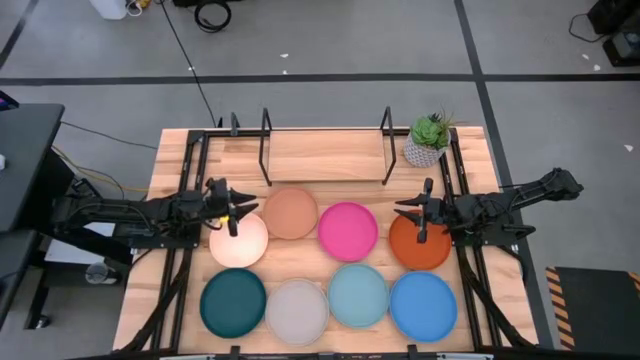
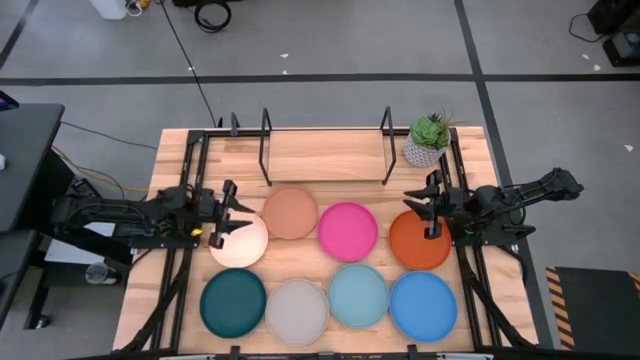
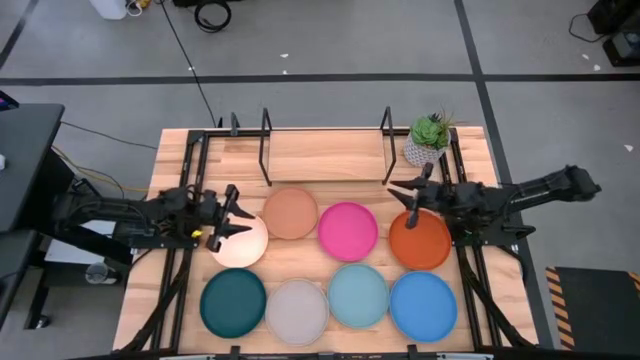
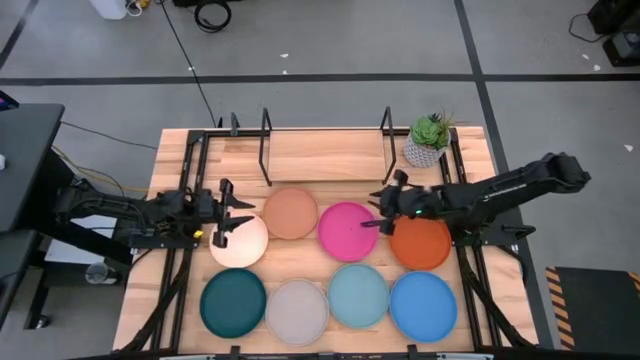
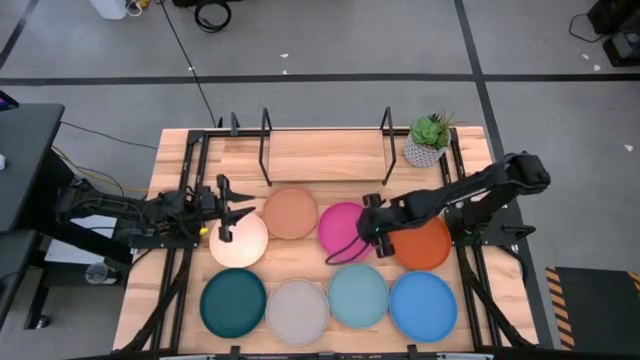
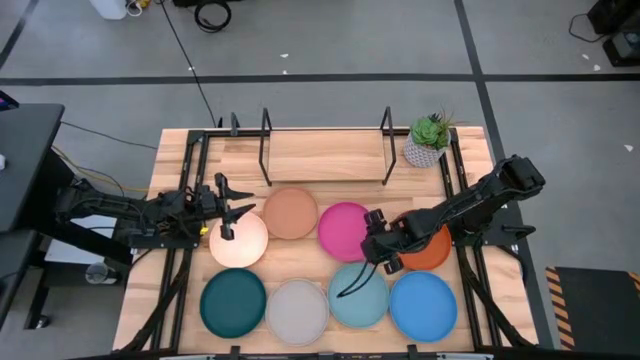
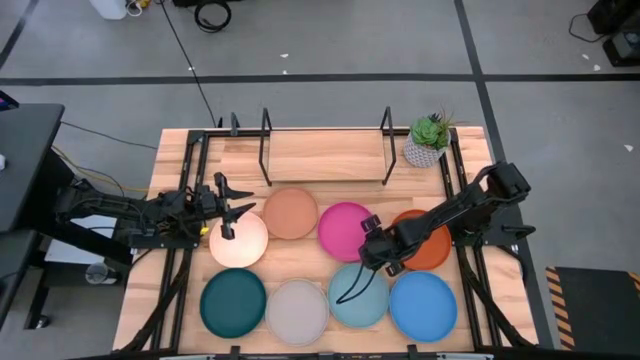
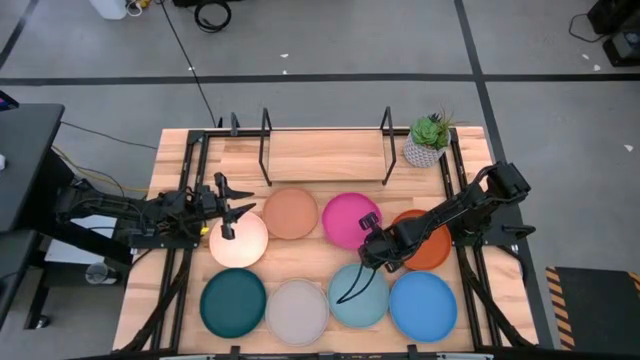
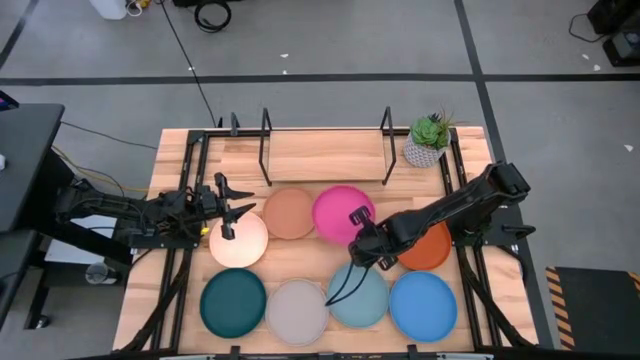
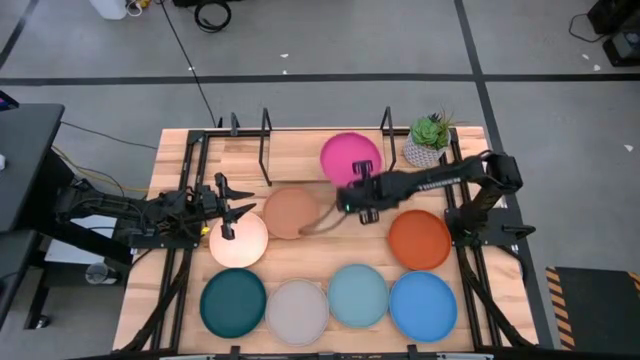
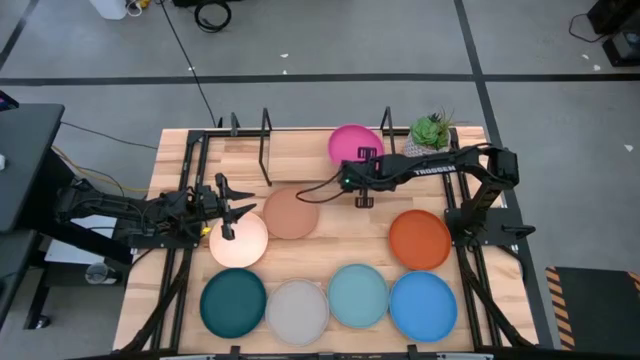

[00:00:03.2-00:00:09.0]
Task: Place and stack plates onto a shelf
Put the pink plate on the shelf

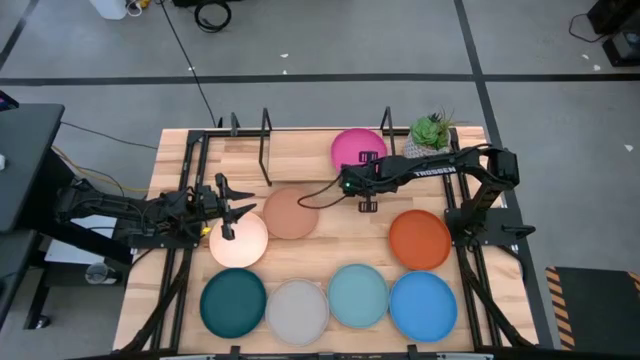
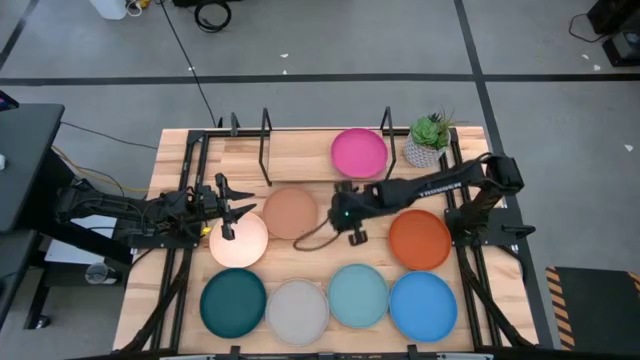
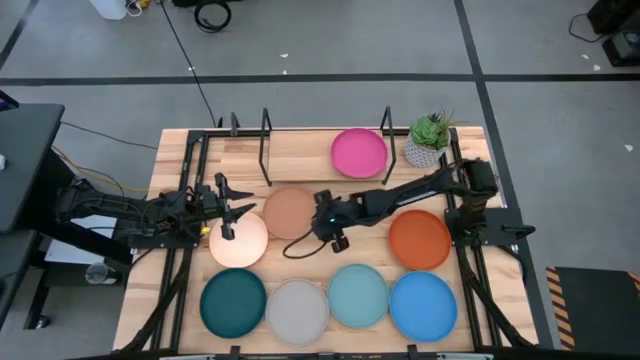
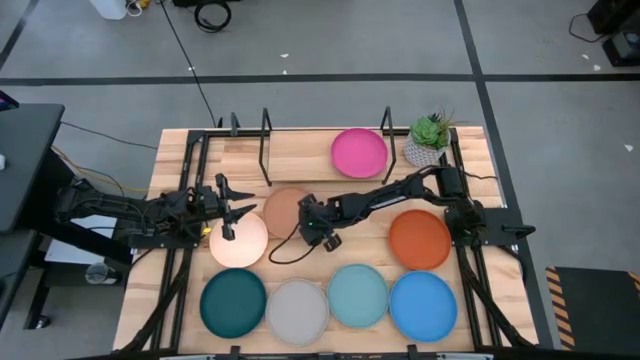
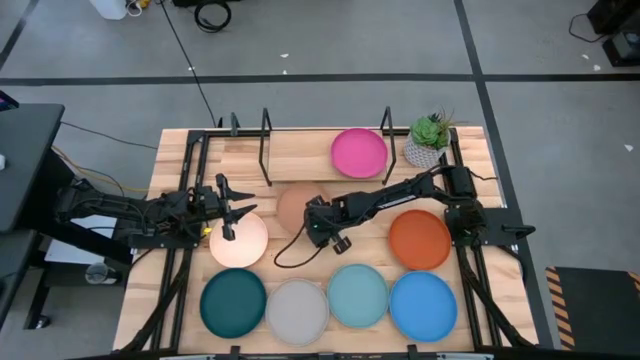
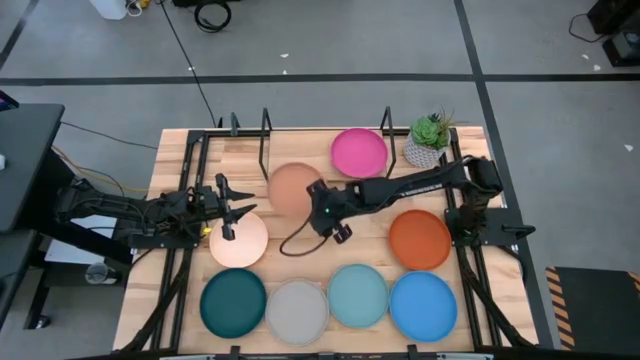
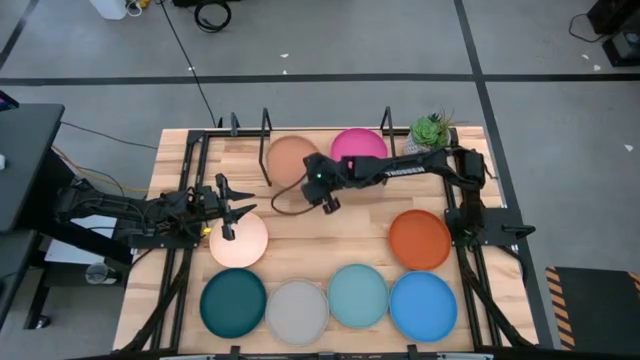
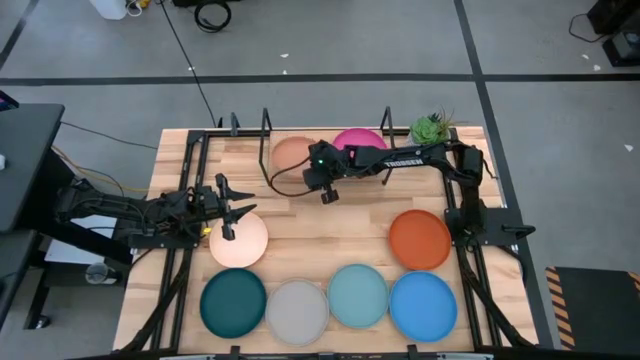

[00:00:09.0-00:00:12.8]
Put the brown plate on the shelf

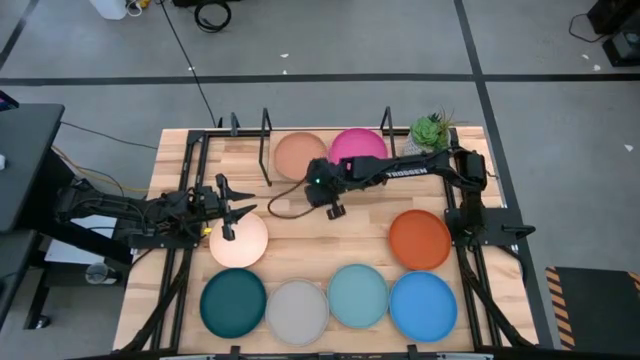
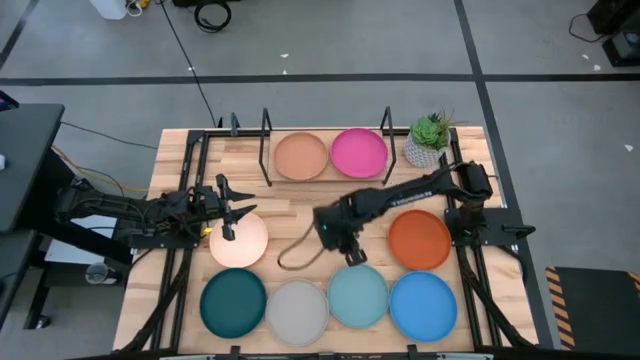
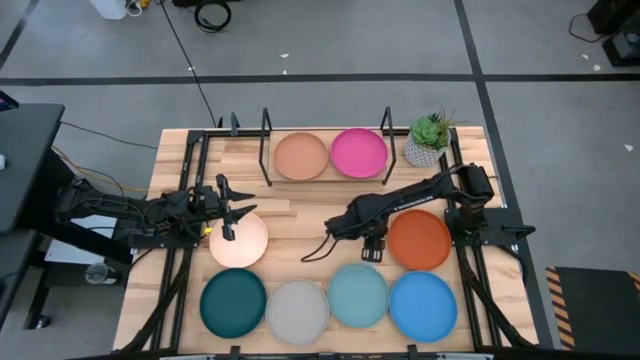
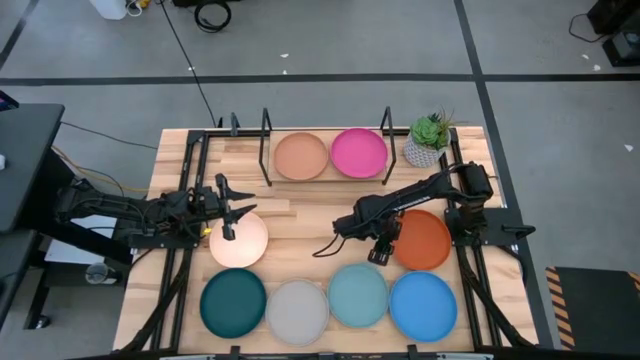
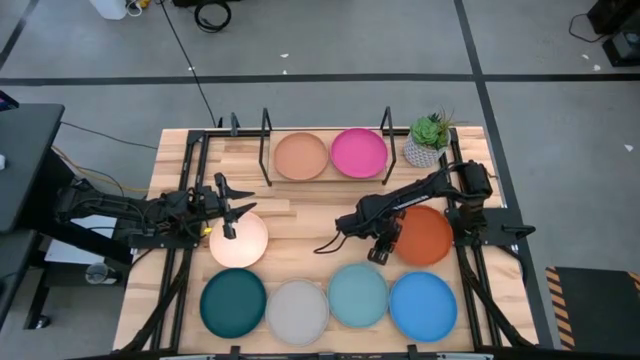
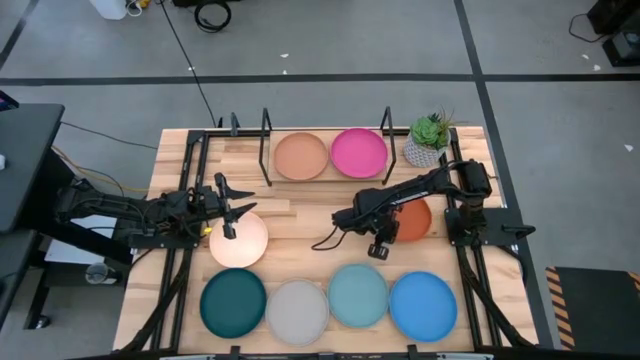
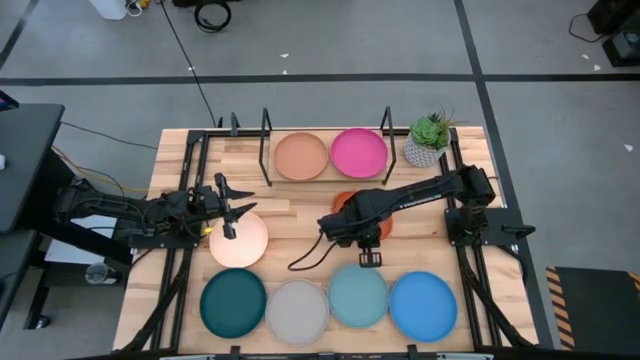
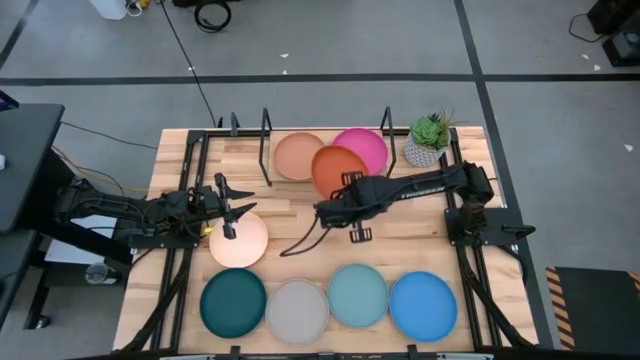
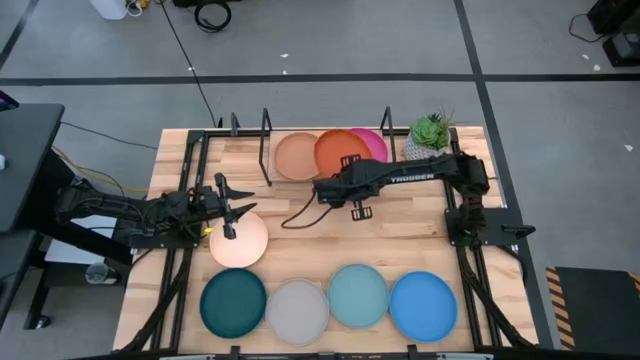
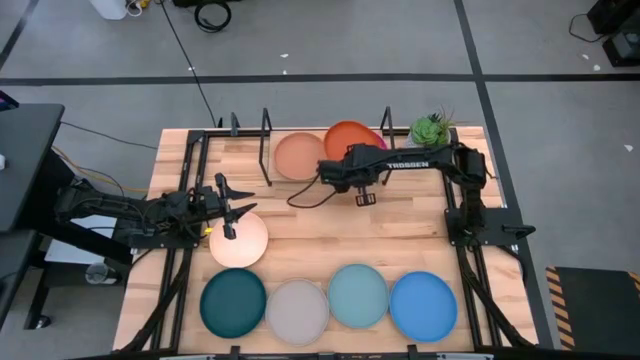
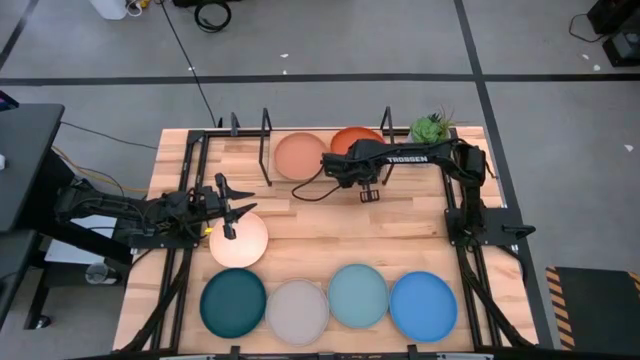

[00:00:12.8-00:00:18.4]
Stack the orange plate on top of the pink plate on the shelf

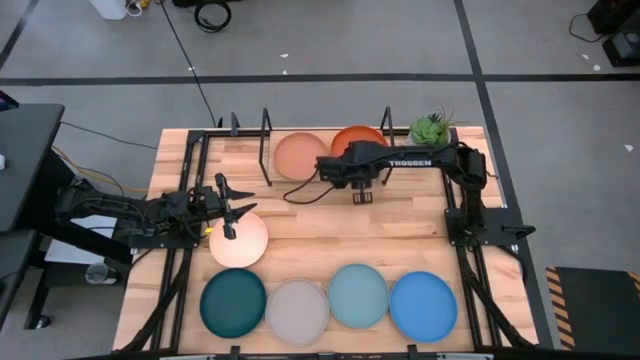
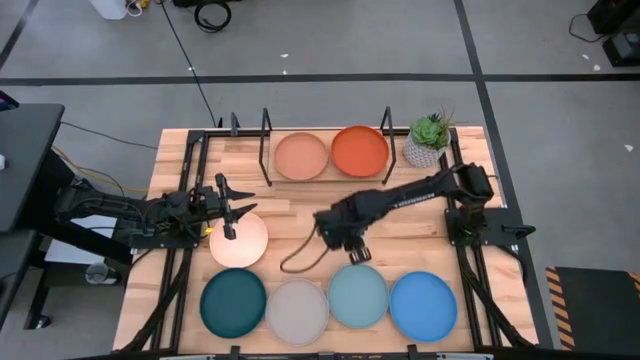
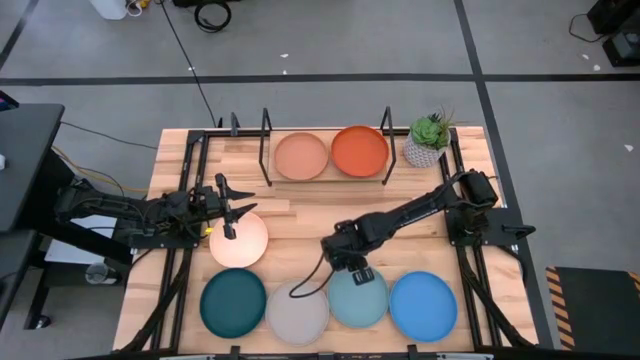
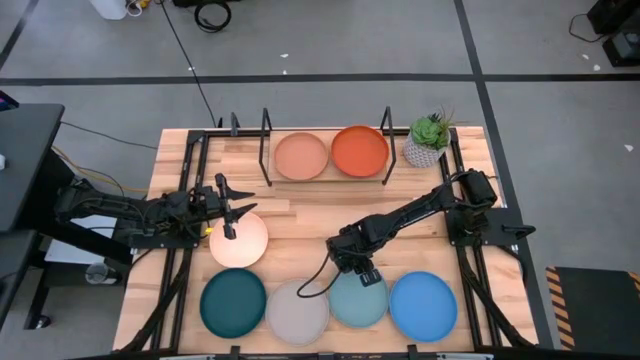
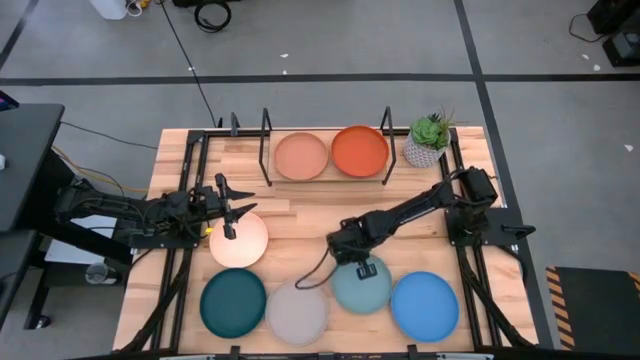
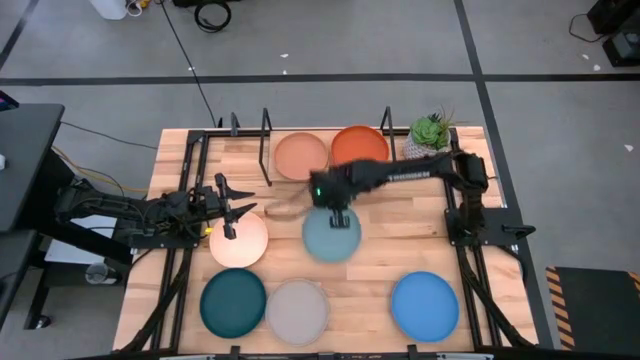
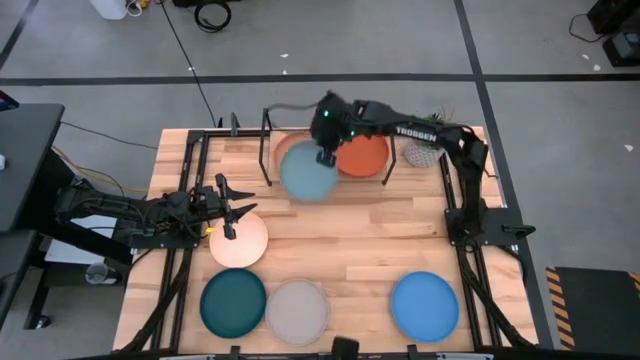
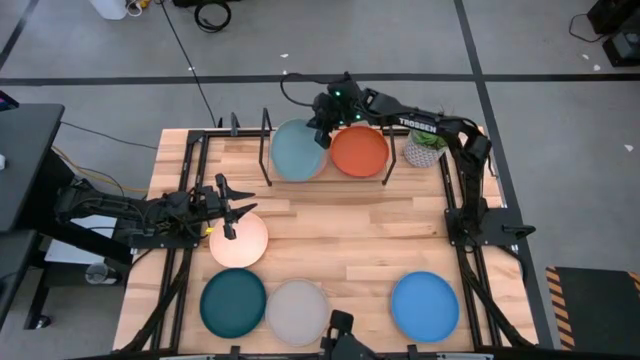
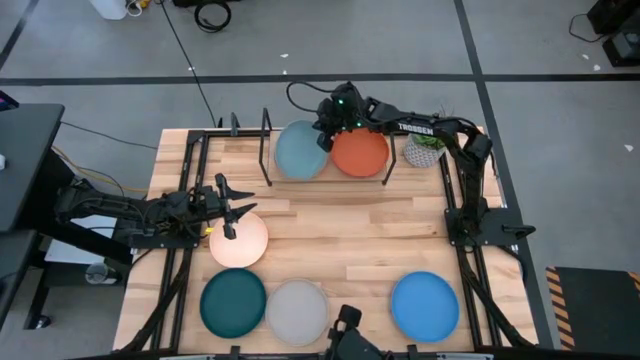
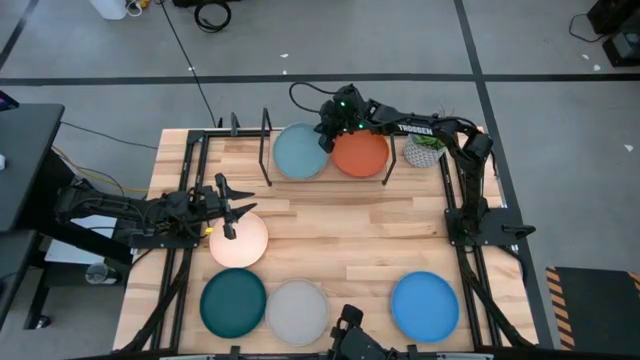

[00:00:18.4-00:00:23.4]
Stack the light blue plate on top of the brown plate on the shelf
